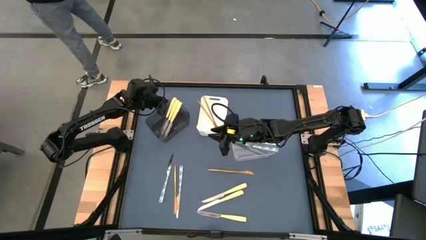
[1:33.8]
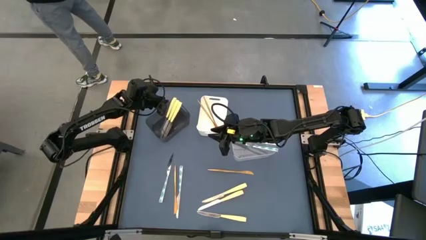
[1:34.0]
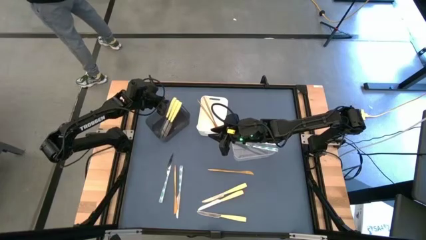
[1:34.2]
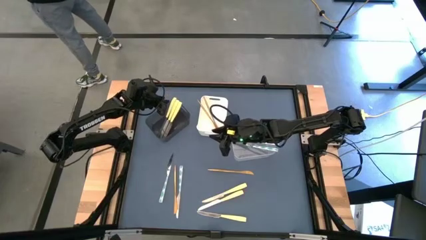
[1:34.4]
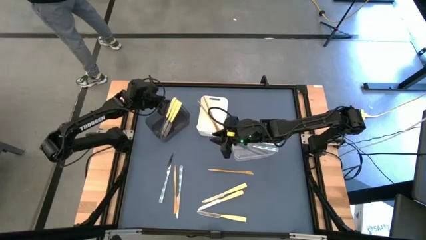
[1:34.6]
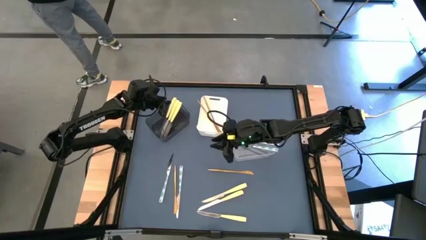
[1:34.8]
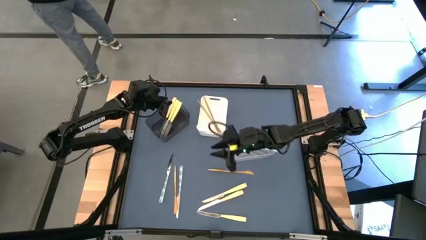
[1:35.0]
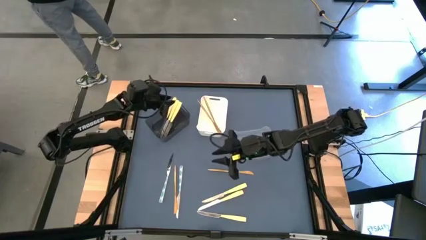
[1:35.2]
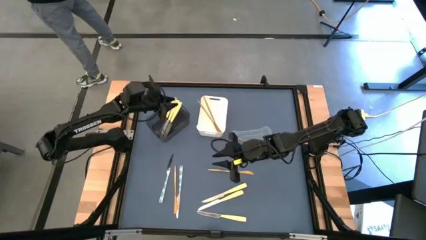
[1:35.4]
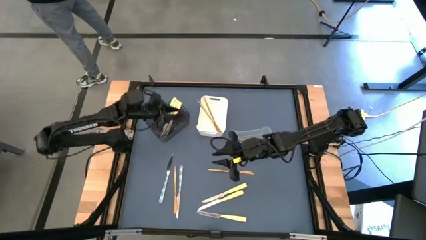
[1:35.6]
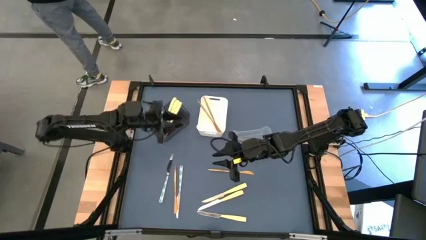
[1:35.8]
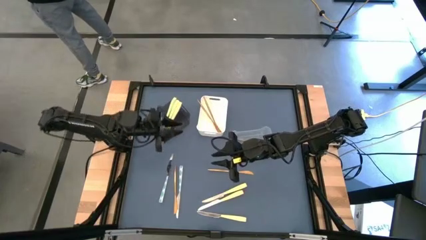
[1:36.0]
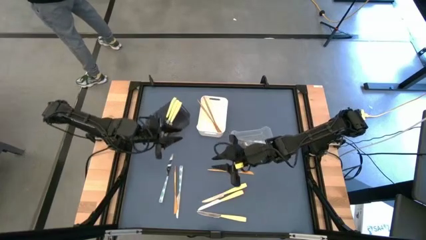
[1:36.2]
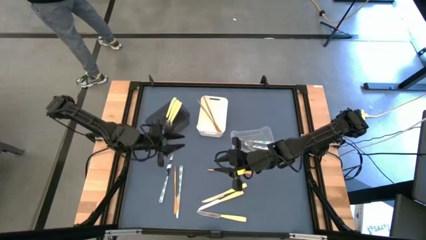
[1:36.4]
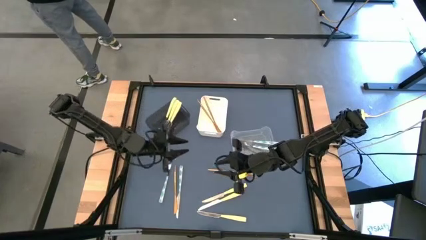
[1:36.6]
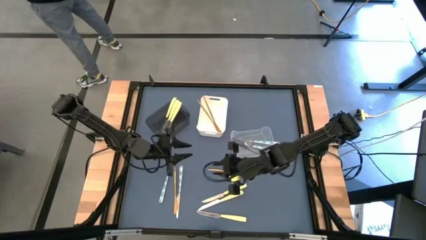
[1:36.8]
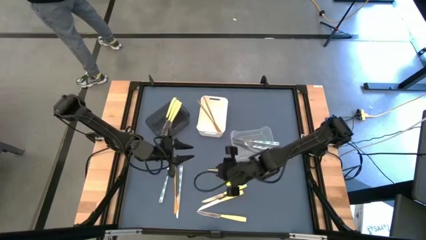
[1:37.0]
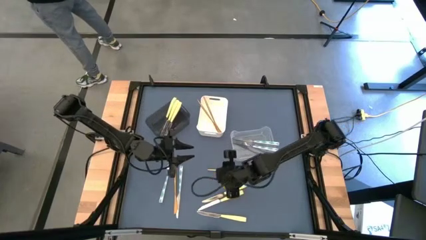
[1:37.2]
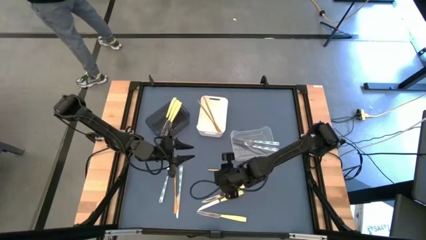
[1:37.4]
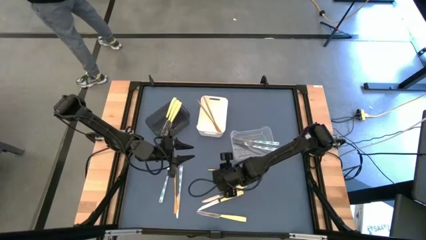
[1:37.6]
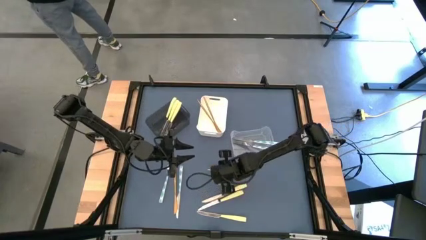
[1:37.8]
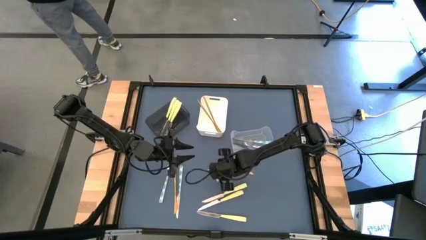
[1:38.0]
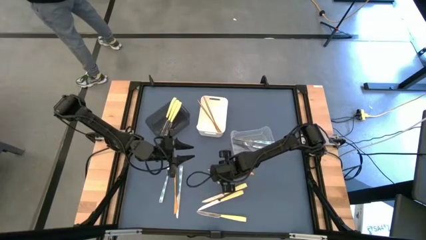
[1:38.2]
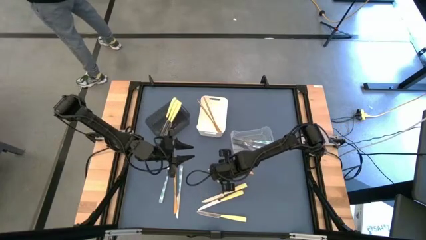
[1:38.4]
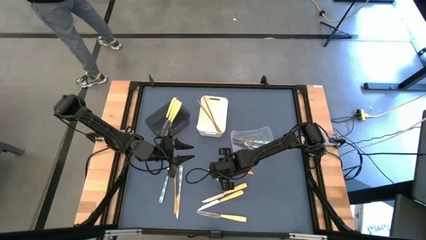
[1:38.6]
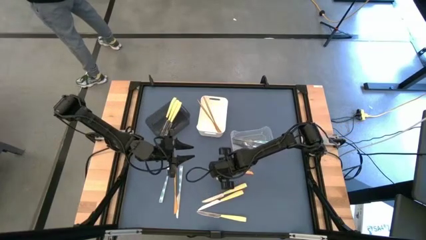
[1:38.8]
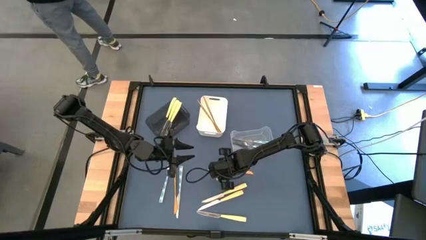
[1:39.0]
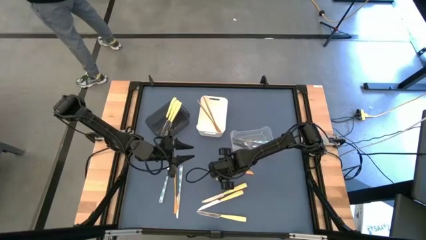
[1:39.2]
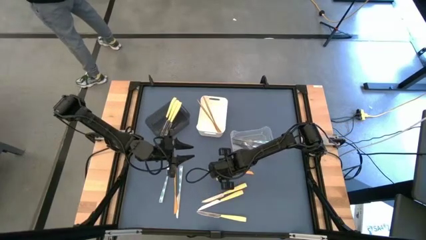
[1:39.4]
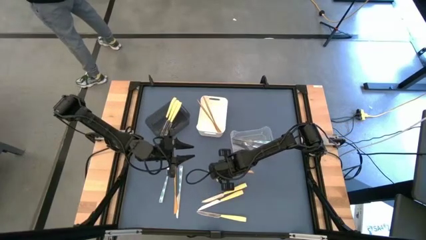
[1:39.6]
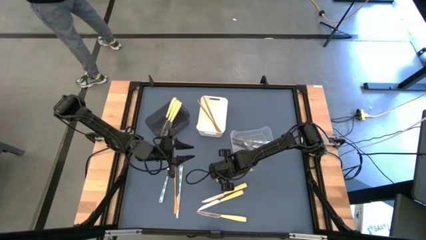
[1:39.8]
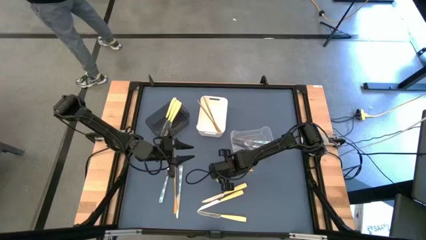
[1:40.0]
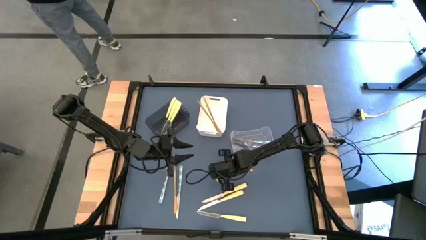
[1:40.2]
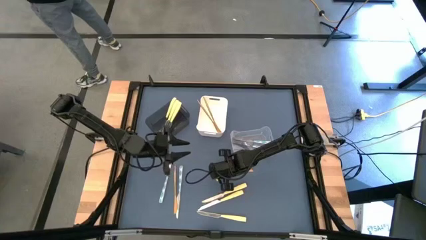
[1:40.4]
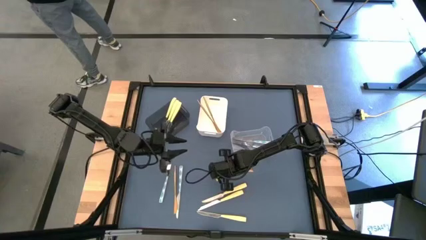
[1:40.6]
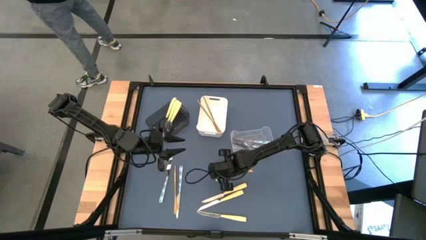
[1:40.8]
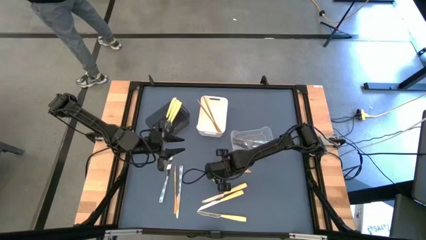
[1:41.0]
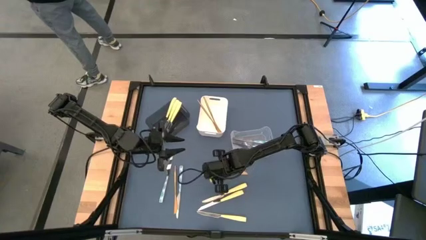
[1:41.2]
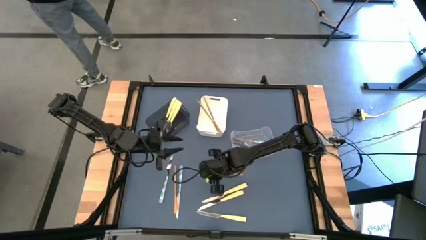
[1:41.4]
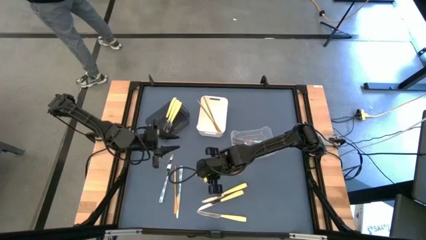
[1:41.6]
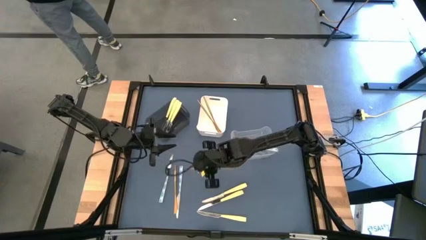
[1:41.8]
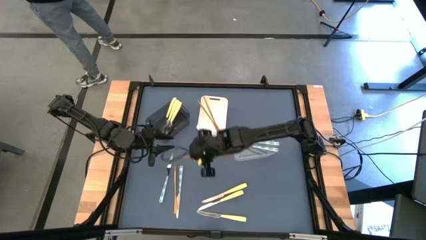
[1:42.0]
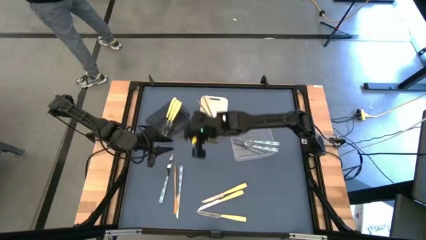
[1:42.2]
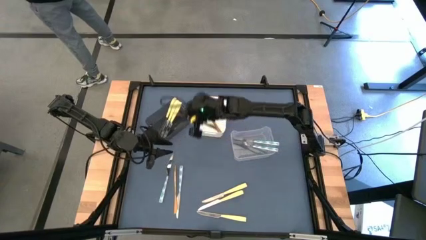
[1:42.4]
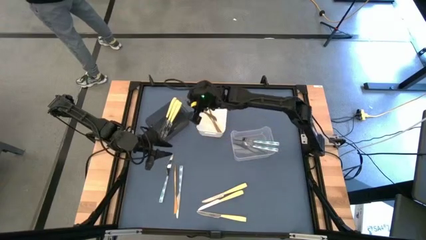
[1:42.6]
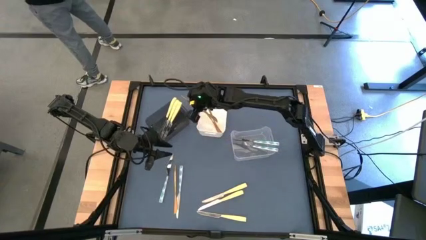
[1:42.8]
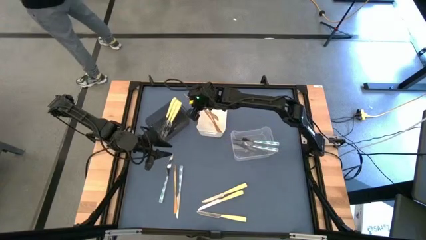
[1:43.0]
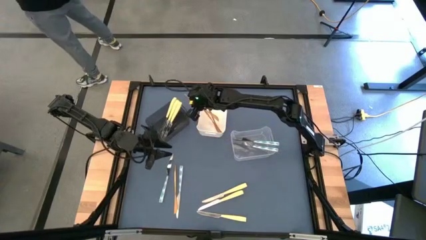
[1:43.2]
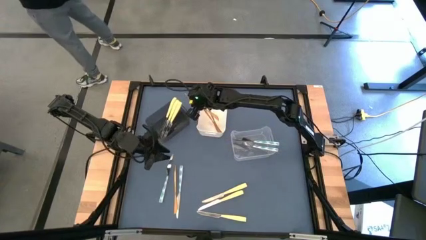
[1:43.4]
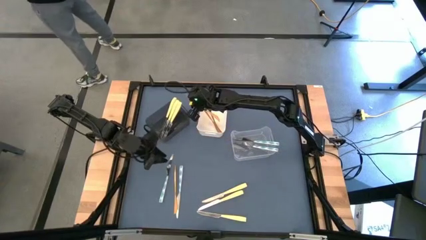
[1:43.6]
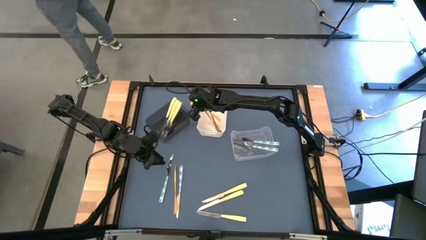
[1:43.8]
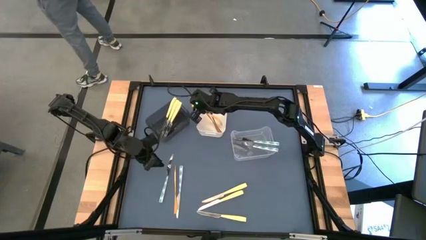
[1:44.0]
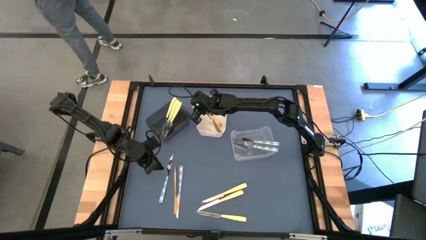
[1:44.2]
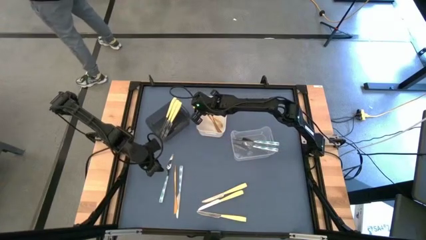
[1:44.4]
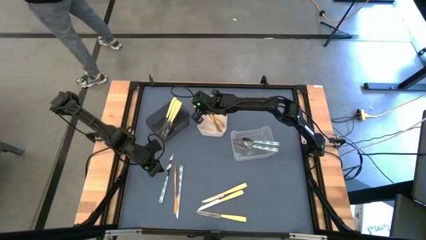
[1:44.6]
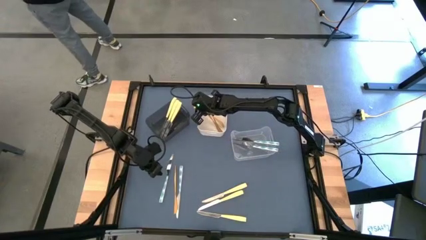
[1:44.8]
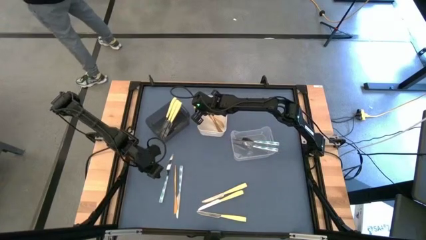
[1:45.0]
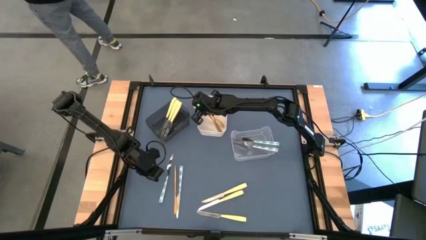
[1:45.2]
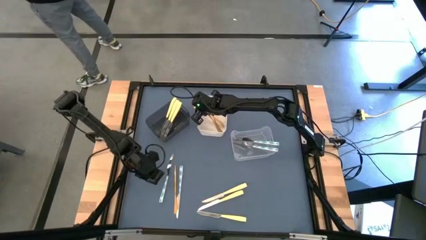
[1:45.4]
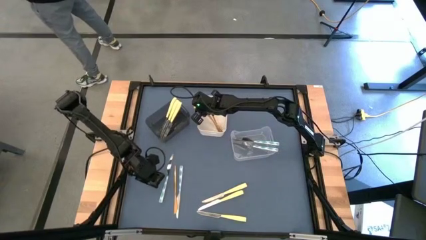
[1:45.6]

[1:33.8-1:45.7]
Task: Sort silverware by color (type)
Put the right gold knife into the white bin

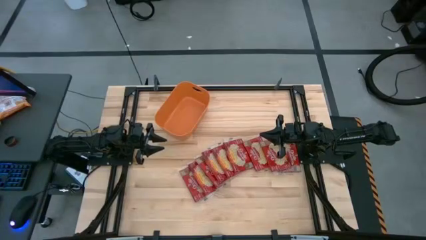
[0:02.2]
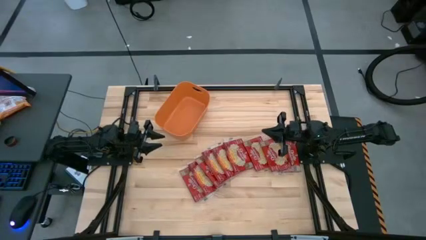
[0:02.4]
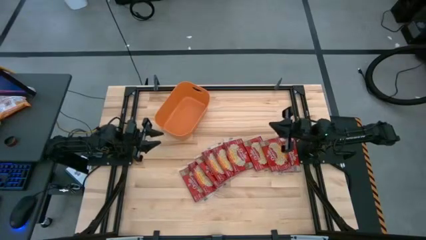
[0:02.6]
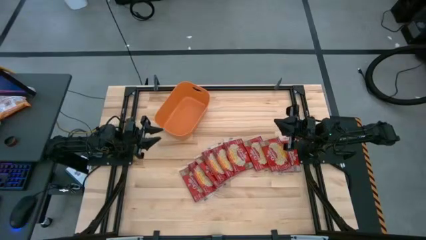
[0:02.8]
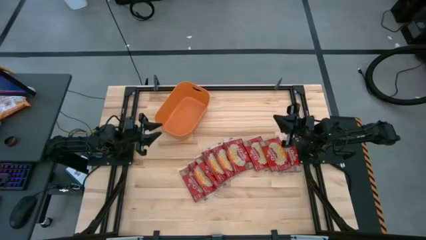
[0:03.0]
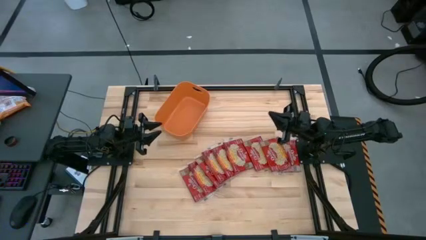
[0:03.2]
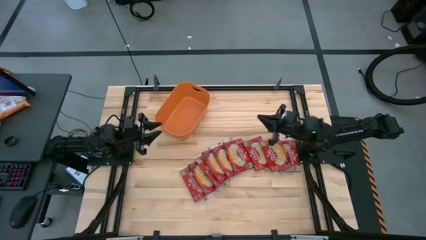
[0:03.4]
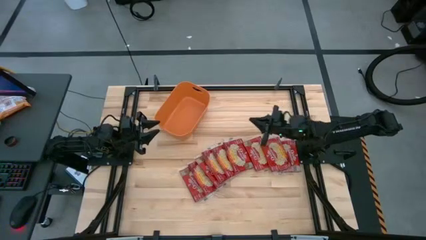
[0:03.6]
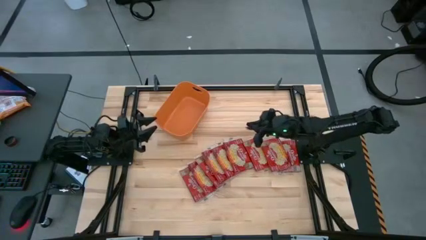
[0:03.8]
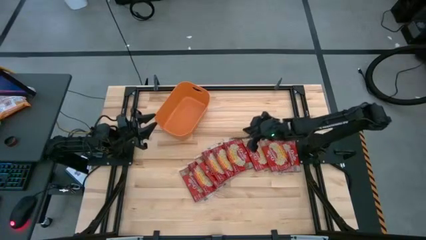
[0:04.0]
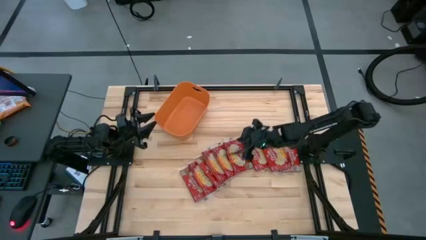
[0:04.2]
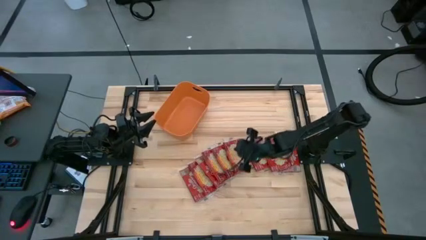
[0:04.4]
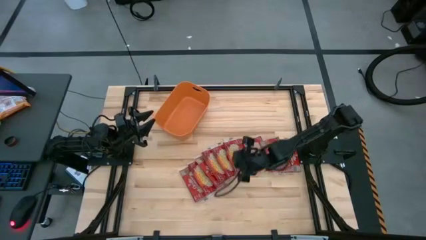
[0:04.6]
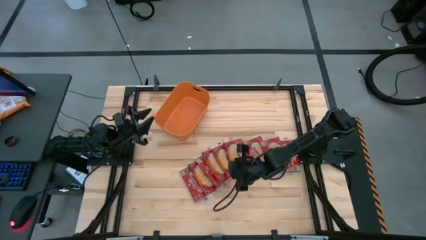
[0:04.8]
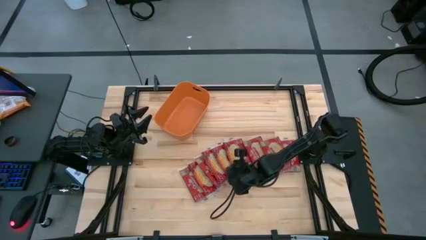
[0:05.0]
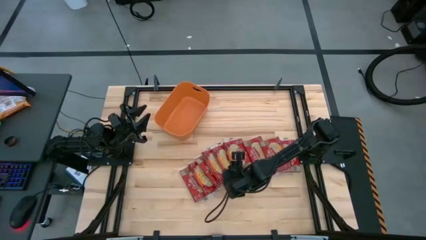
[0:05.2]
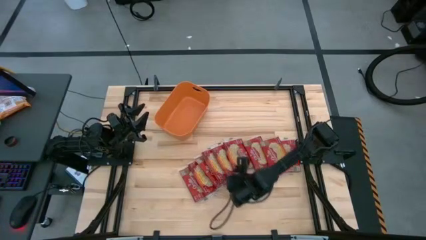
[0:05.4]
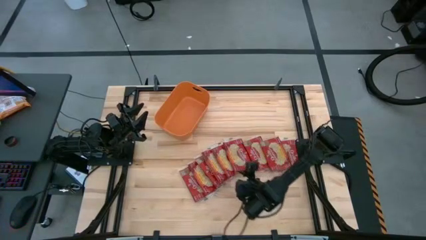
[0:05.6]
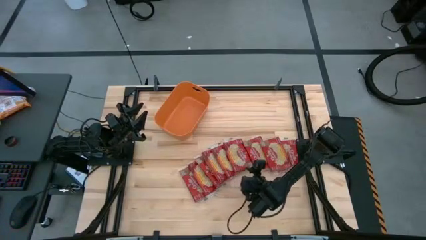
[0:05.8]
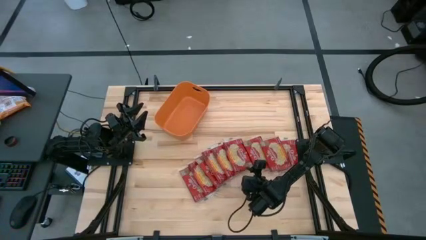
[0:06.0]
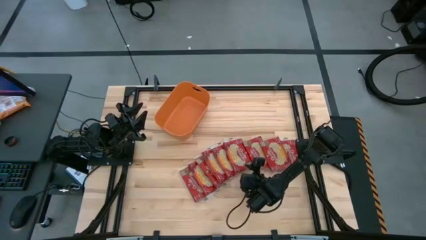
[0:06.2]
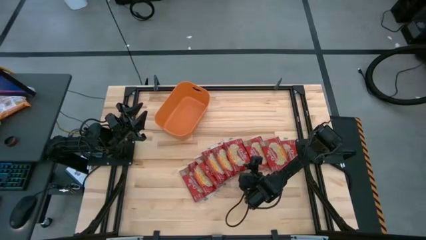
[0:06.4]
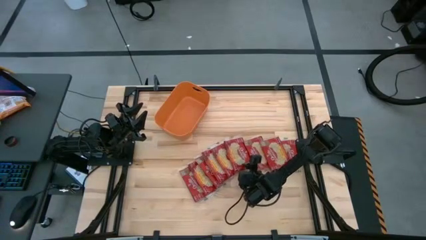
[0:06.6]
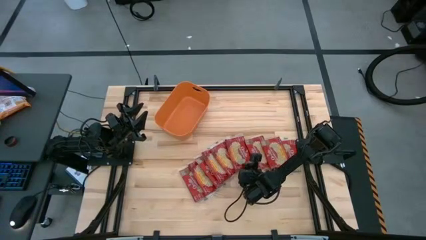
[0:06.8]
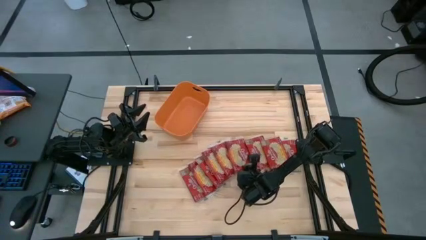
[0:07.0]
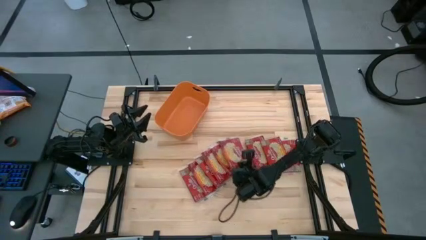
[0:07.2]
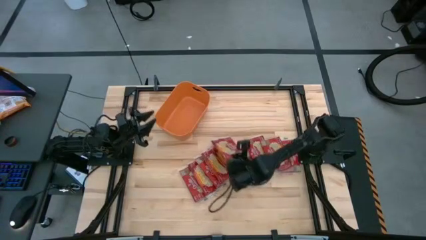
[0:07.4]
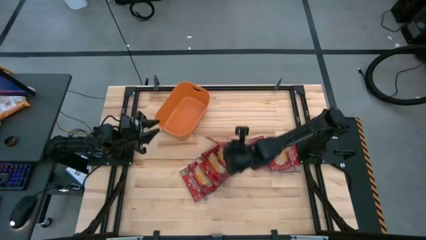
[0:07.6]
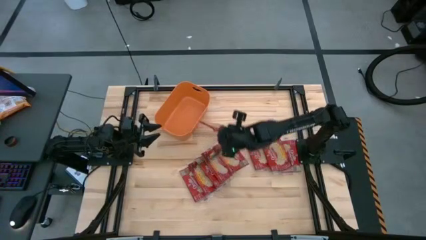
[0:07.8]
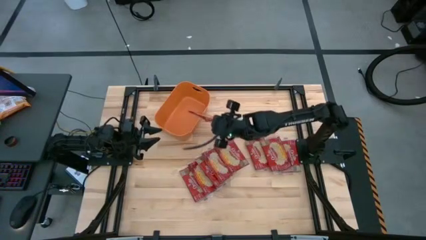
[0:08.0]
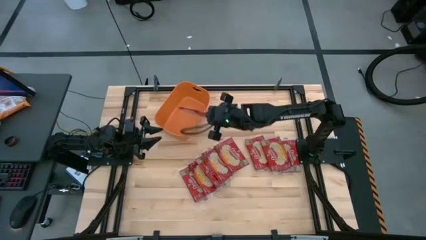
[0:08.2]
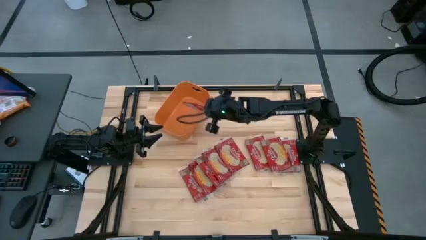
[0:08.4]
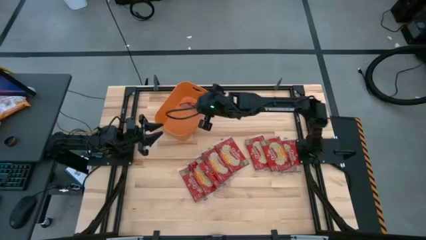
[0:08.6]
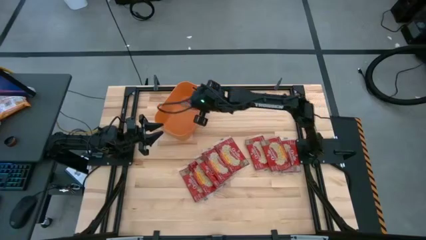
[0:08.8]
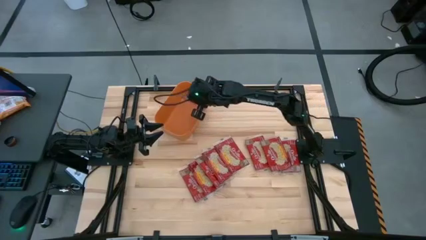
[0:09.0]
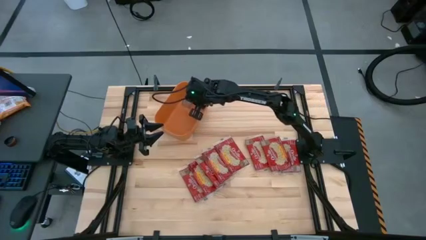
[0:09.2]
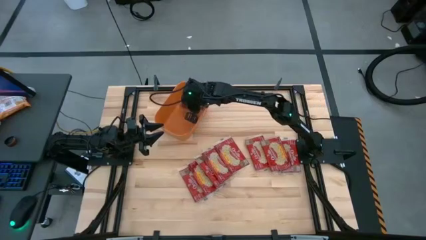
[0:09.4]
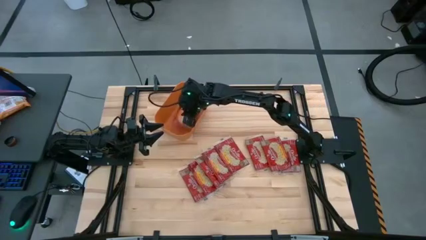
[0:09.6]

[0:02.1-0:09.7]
Task: Sort popcorn bags into baskets
Put the red popcorn bag into the orange bin
